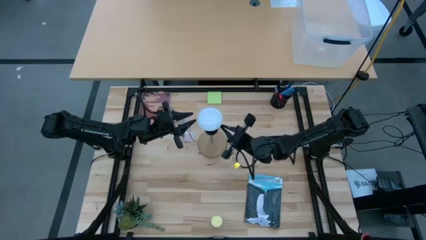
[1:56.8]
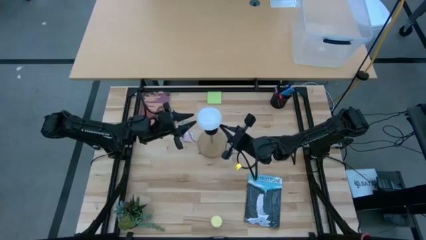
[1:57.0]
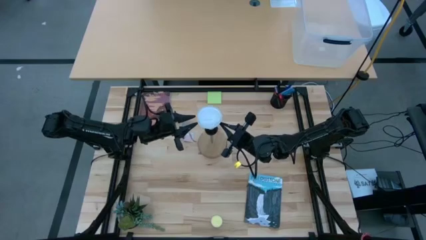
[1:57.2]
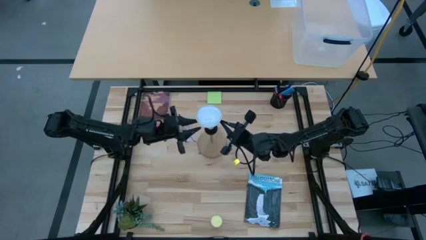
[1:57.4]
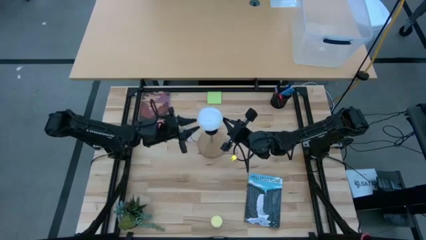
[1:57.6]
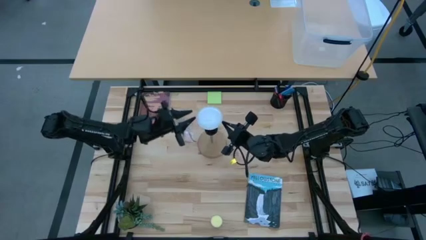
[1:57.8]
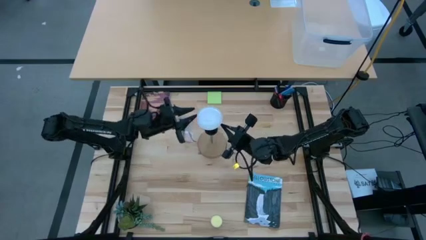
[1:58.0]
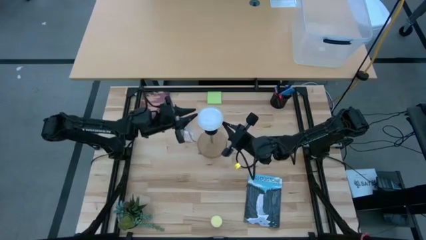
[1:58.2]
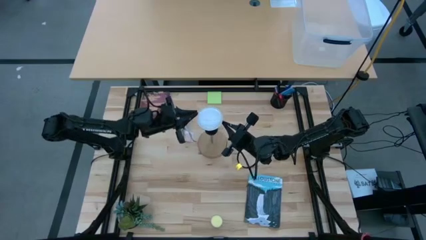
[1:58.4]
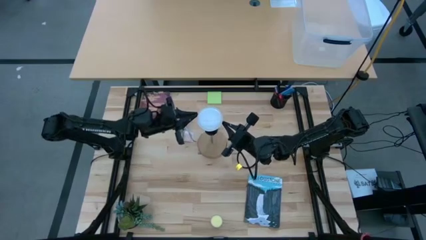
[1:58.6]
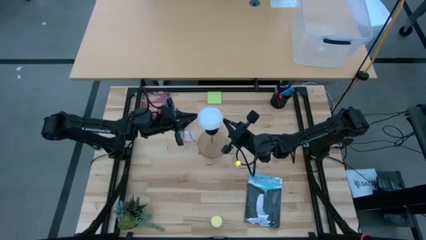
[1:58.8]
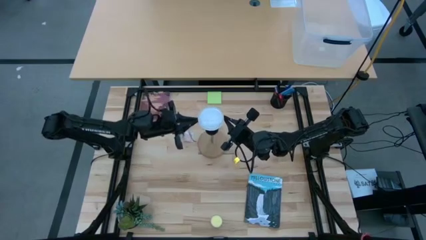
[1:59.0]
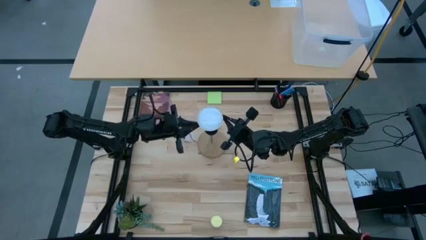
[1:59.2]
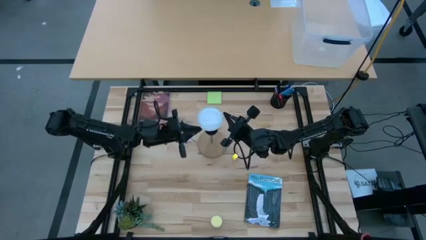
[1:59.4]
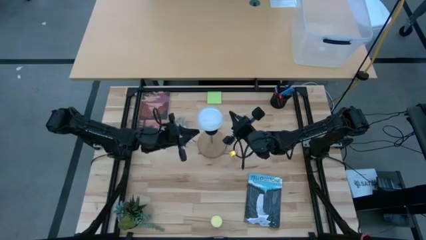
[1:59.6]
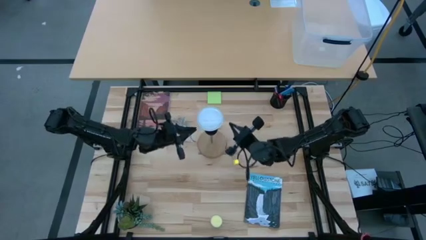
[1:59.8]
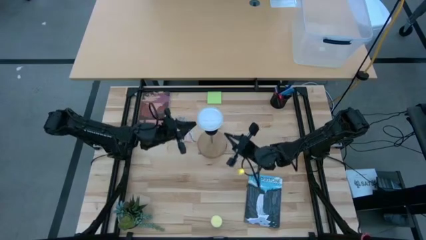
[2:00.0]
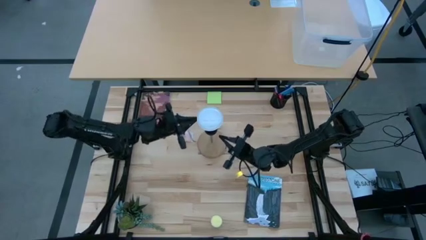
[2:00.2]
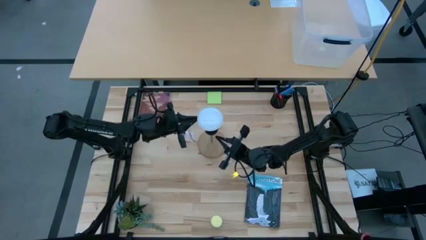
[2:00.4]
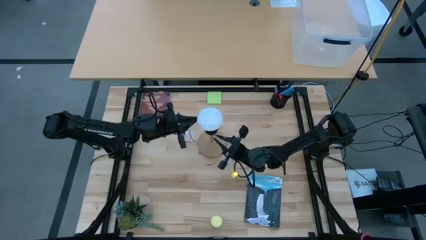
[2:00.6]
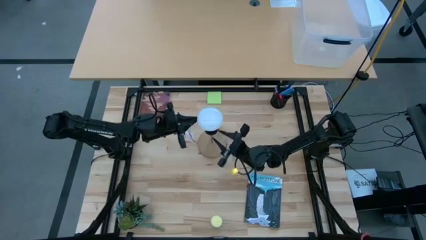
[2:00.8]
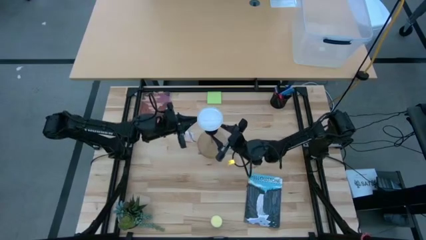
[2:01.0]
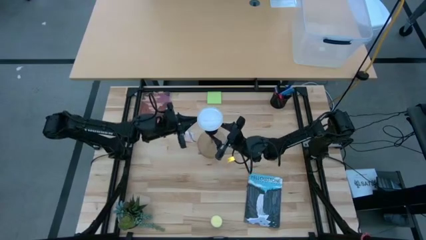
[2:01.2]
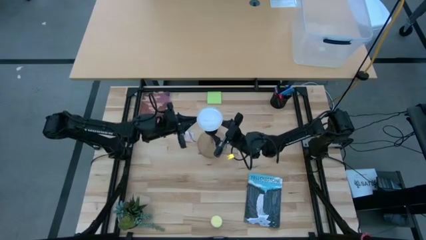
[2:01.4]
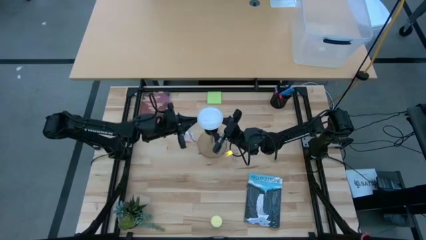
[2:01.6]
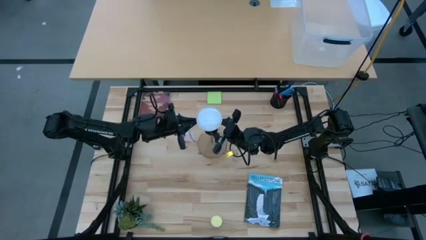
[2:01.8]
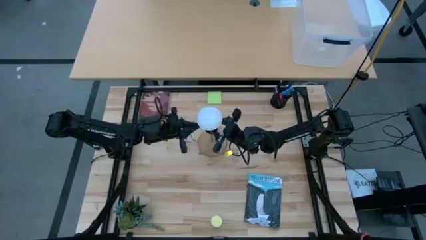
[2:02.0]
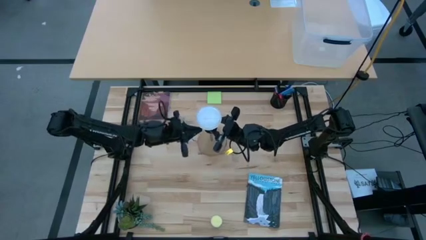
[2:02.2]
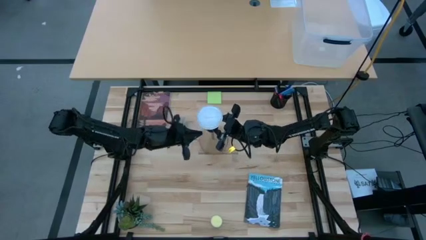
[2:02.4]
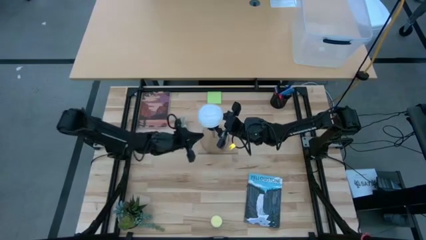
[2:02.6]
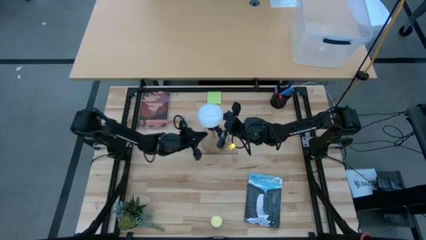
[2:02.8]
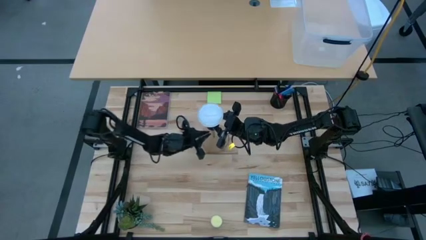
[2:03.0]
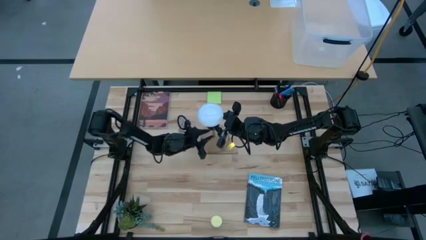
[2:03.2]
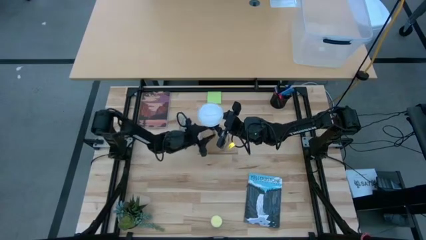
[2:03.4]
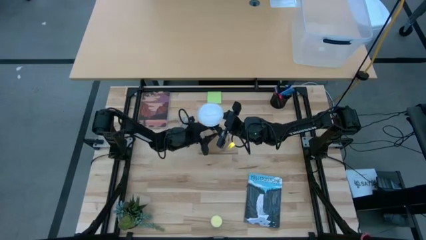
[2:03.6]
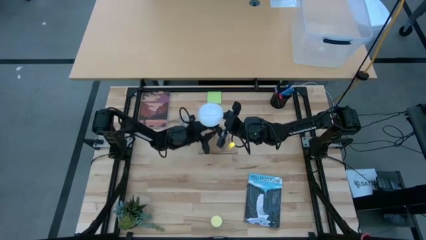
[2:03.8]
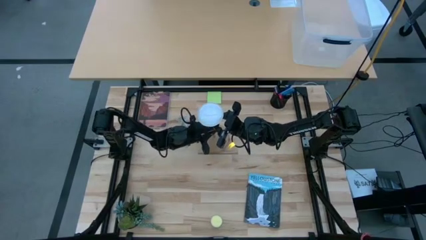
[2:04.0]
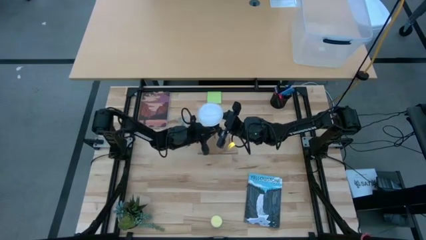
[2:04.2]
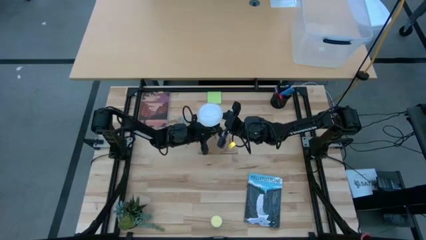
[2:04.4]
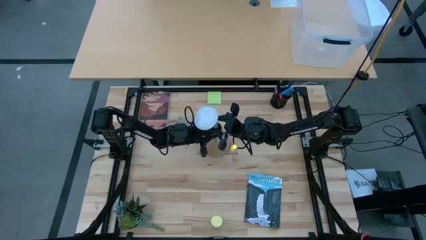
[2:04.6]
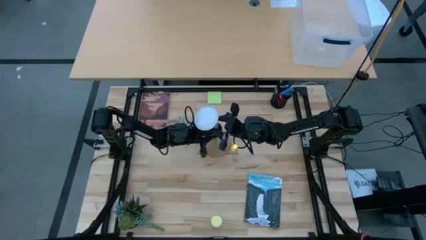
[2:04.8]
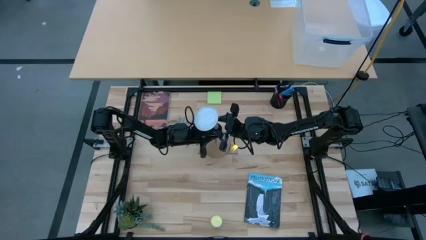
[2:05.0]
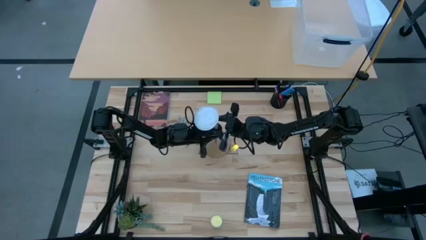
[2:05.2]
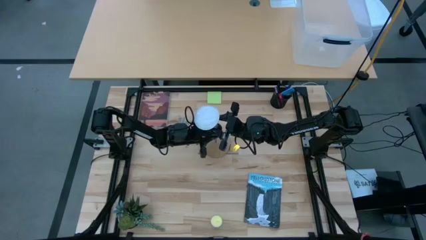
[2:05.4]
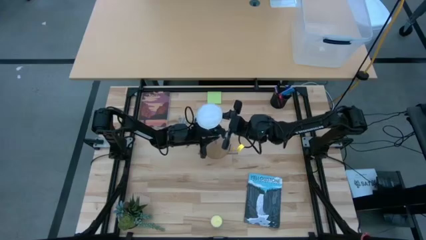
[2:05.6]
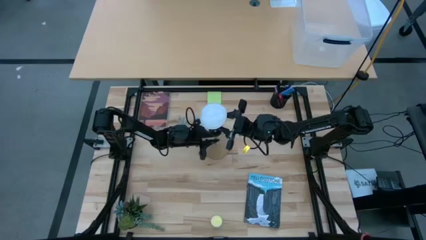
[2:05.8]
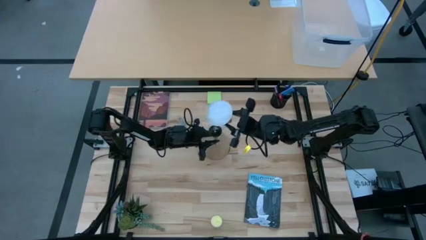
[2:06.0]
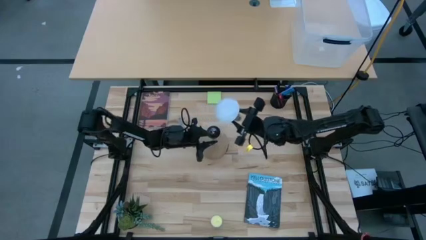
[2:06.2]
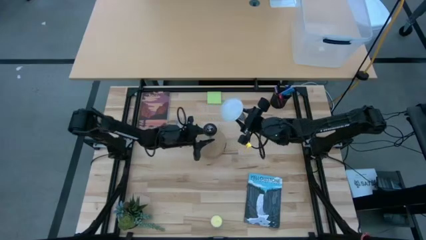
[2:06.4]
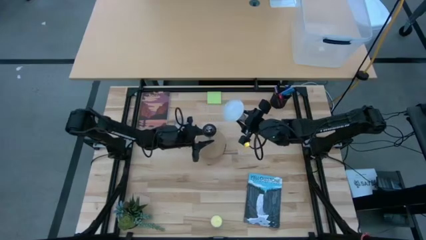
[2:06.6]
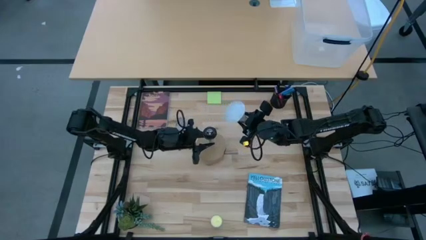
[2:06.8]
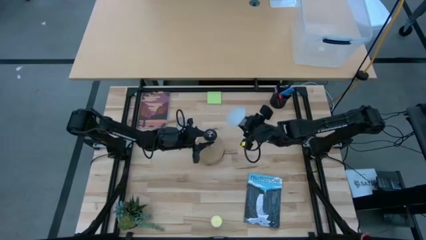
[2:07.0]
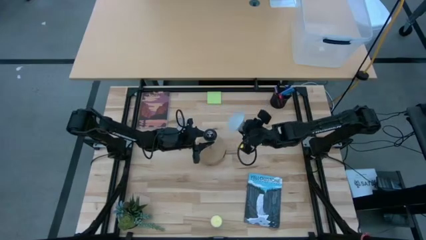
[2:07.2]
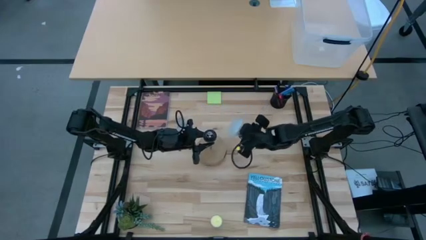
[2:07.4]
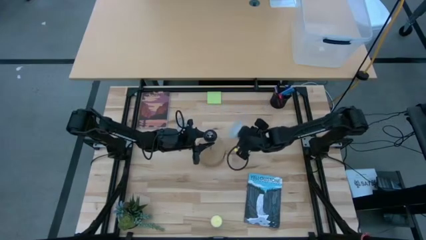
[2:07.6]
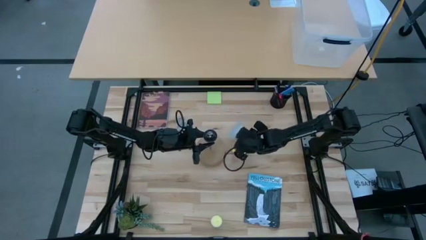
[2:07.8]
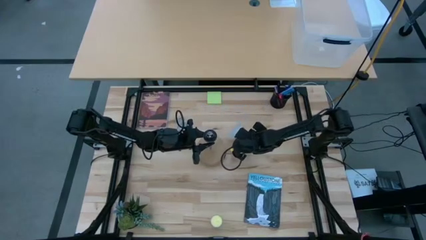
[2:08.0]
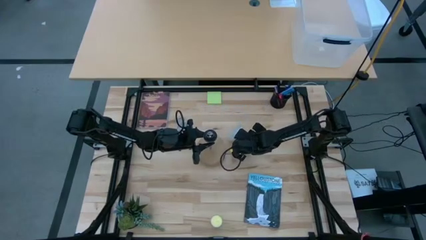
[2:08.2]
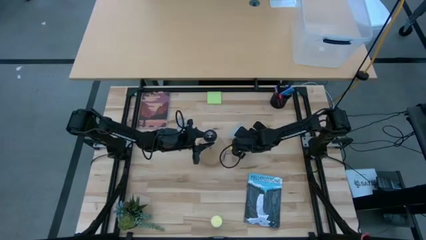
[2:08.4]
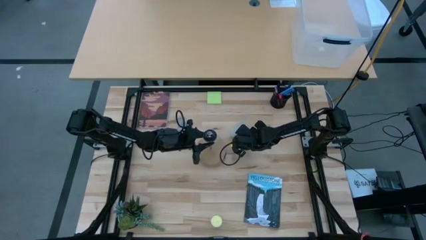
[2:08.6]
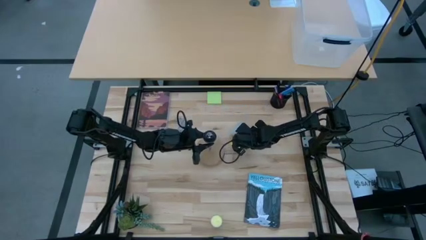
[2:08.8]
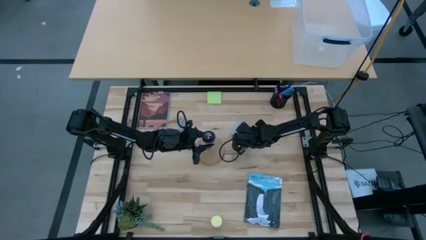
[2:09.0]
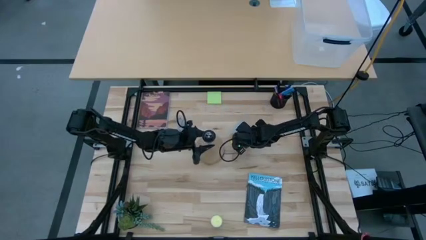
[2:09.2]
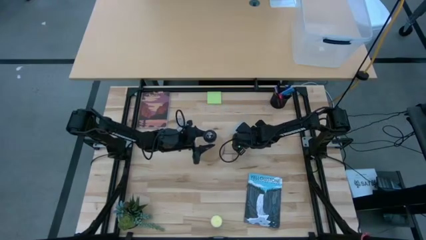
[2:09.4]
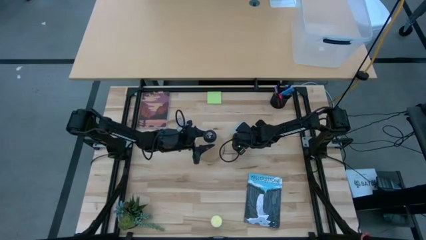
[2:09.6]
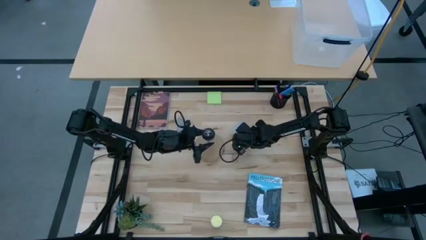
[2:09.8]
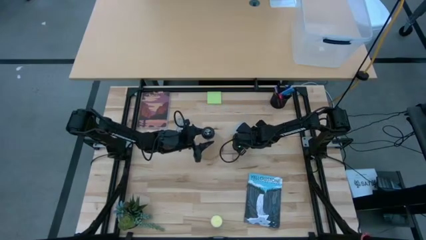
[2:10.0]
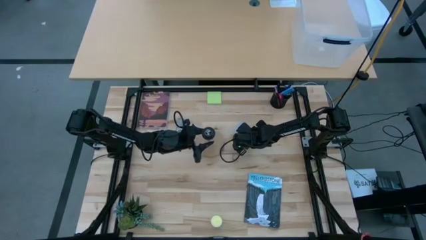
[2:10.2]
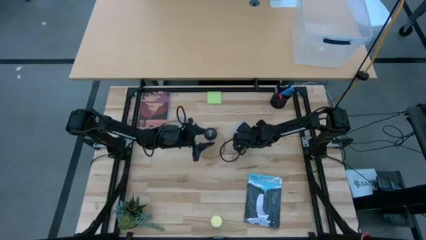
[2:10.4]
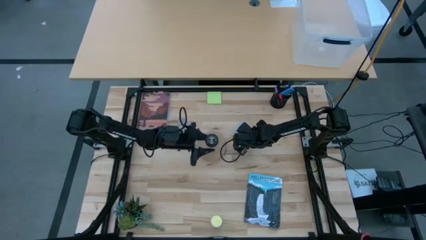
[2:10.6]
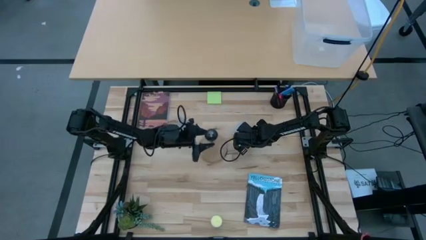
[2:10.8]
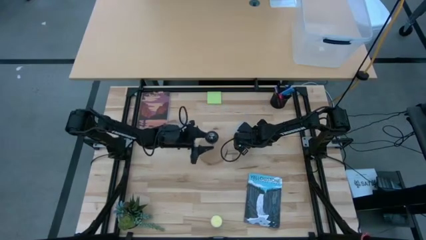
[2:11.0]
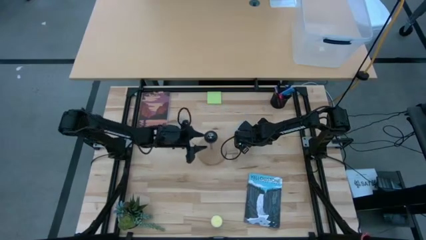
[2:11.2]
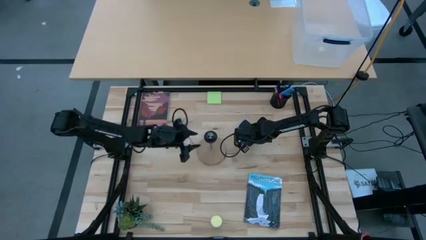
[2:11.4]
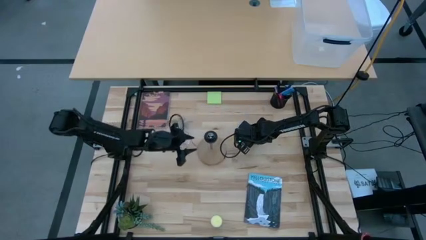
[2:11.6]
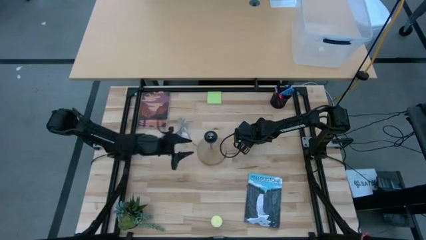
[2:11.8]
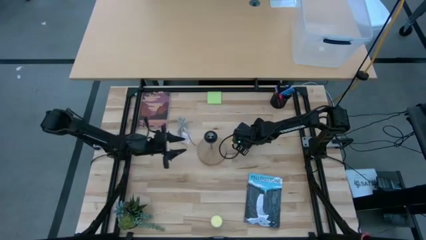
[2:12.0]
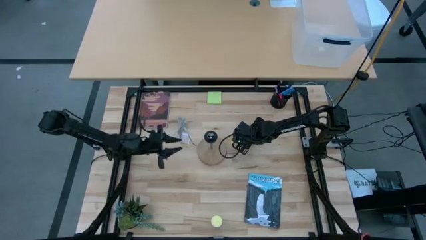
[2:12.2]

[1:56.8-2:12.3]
Task: Screw lightbulb
Remove the lightbulb from the lamp
